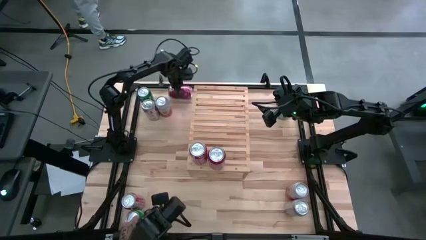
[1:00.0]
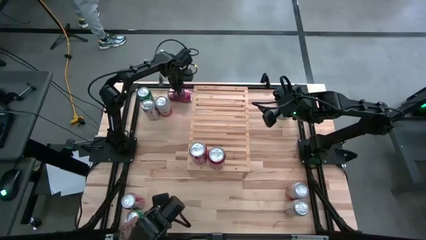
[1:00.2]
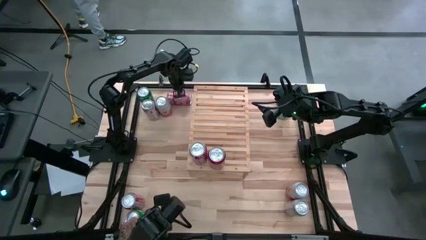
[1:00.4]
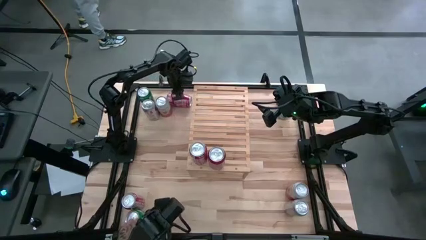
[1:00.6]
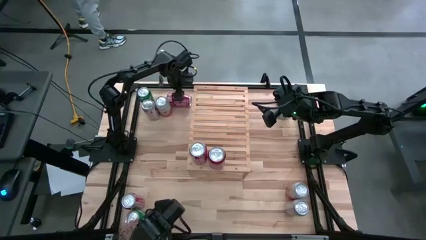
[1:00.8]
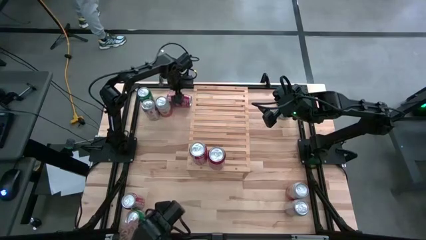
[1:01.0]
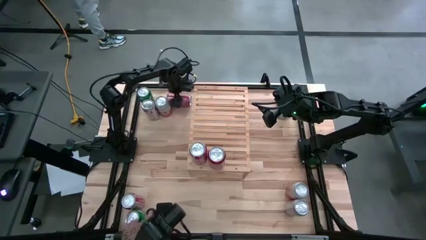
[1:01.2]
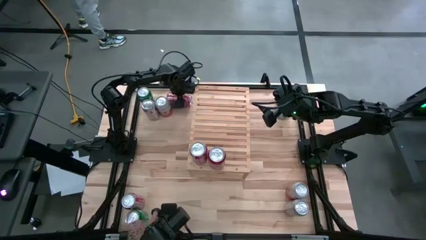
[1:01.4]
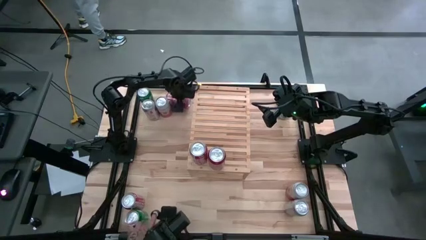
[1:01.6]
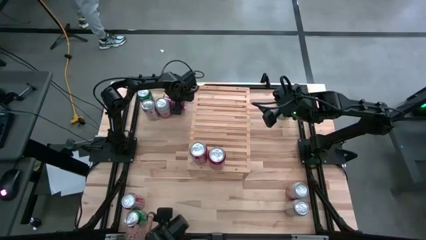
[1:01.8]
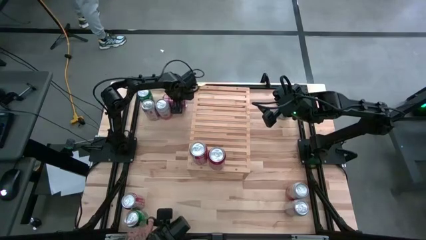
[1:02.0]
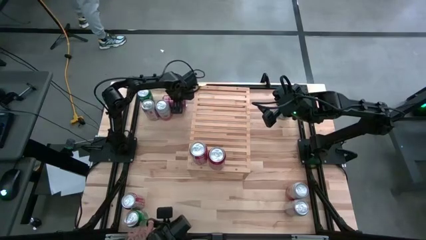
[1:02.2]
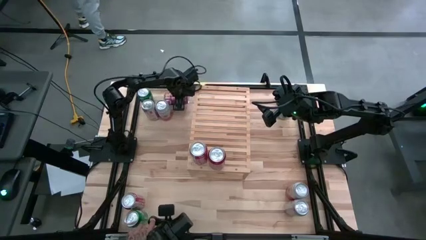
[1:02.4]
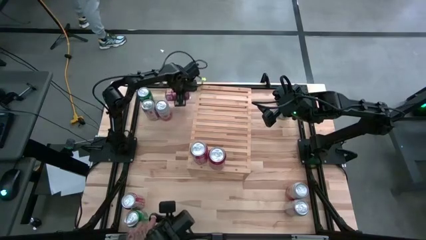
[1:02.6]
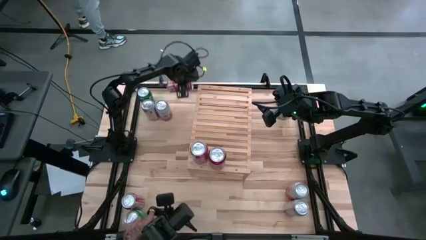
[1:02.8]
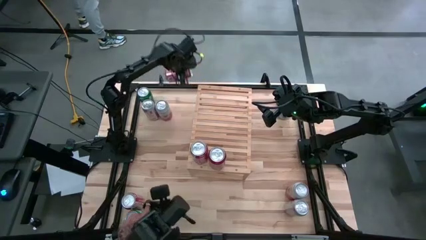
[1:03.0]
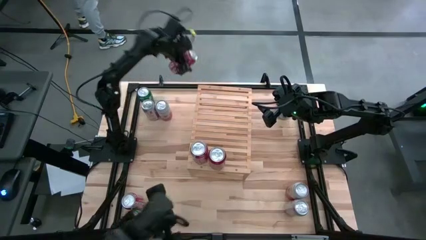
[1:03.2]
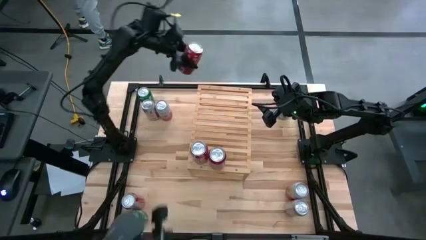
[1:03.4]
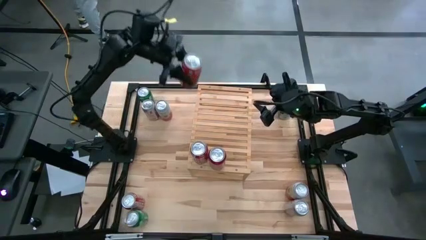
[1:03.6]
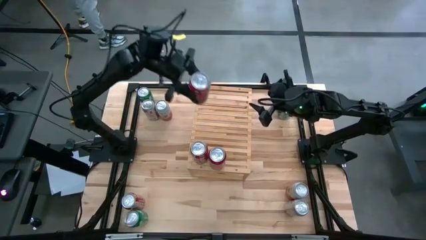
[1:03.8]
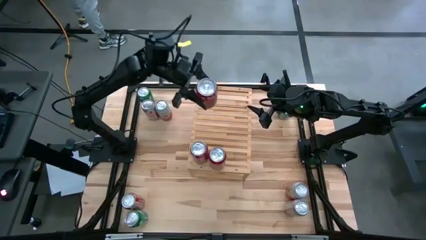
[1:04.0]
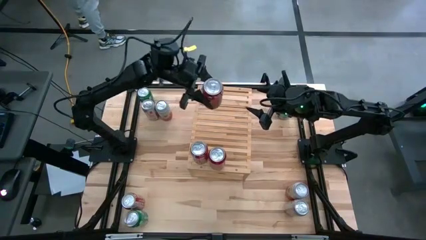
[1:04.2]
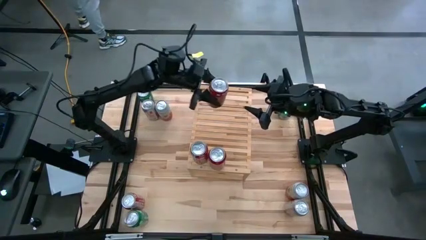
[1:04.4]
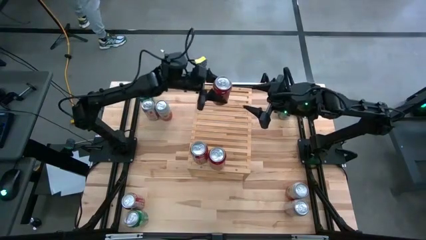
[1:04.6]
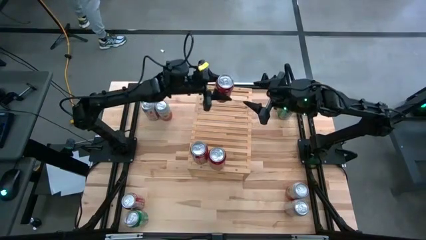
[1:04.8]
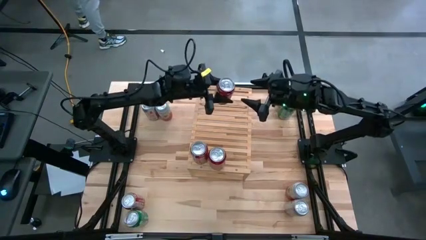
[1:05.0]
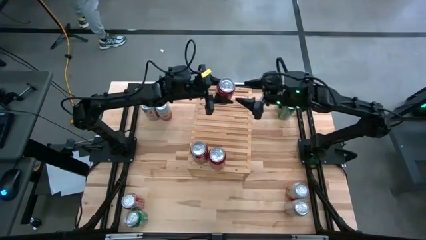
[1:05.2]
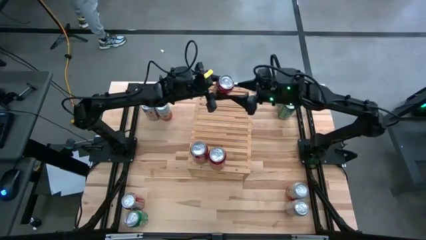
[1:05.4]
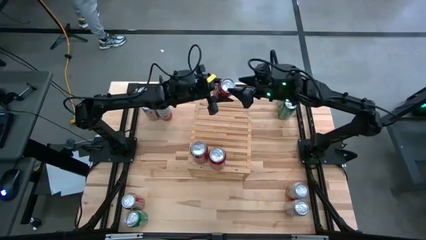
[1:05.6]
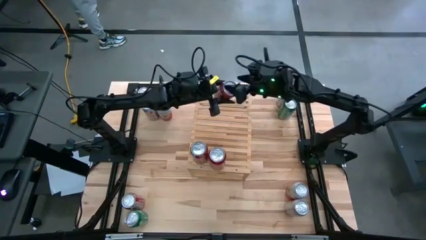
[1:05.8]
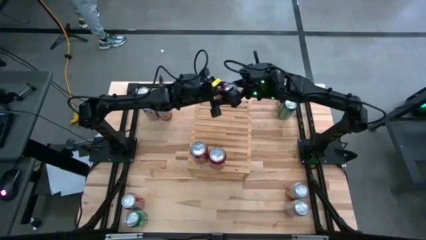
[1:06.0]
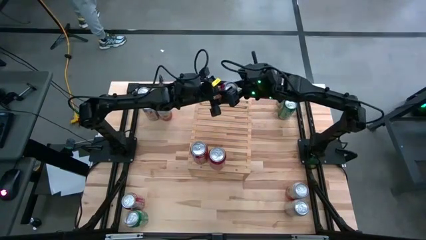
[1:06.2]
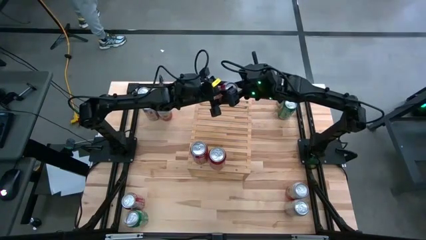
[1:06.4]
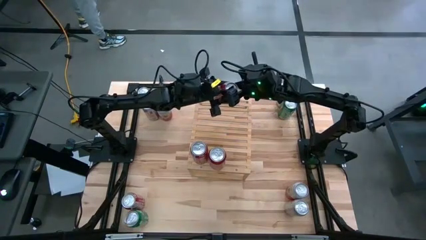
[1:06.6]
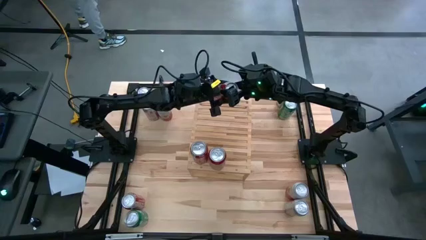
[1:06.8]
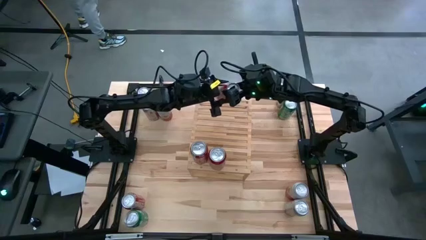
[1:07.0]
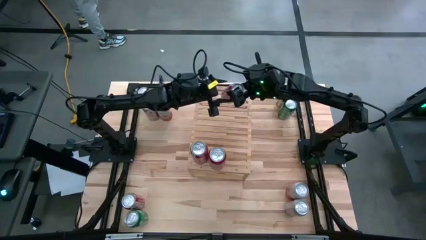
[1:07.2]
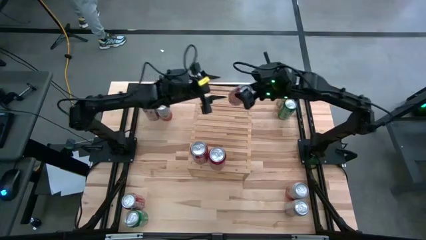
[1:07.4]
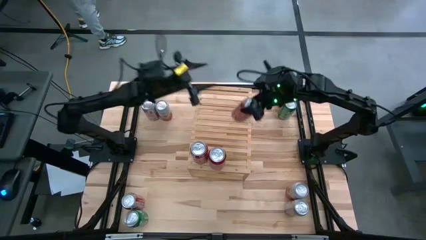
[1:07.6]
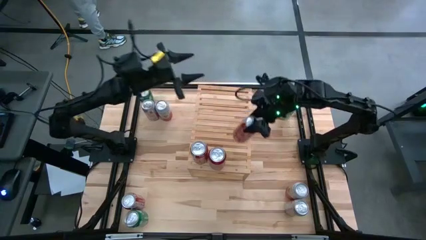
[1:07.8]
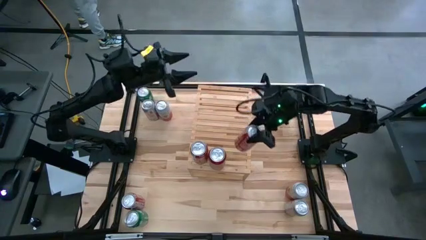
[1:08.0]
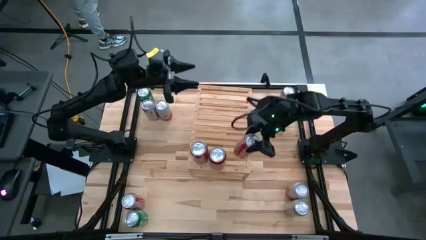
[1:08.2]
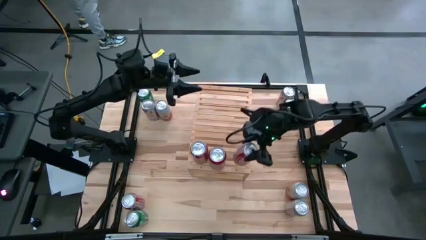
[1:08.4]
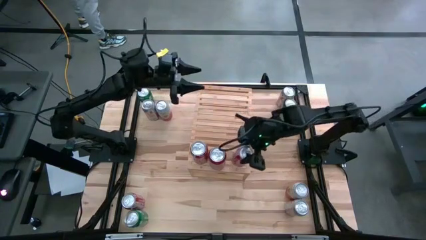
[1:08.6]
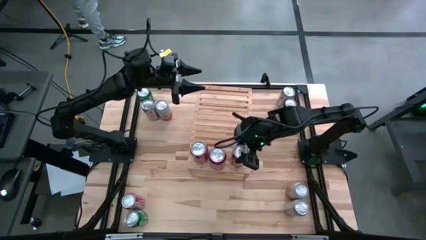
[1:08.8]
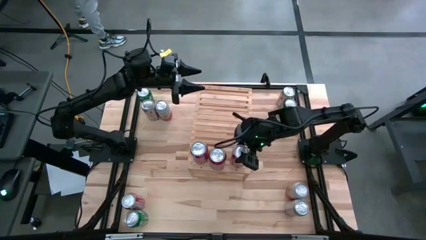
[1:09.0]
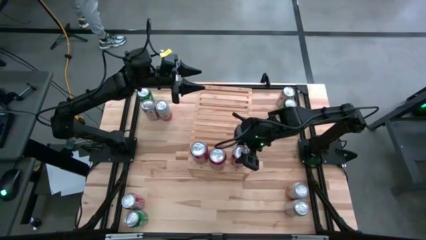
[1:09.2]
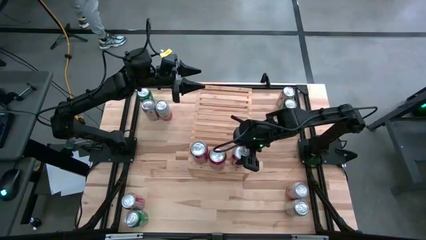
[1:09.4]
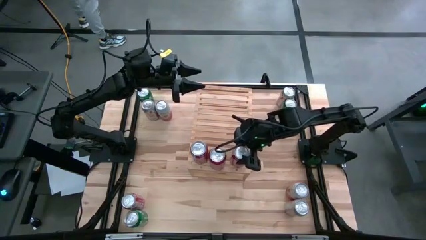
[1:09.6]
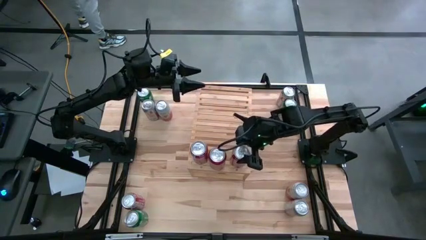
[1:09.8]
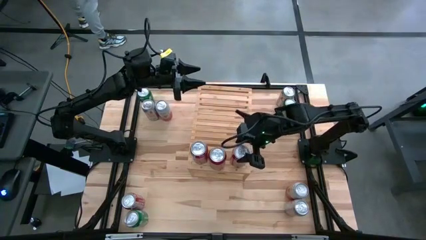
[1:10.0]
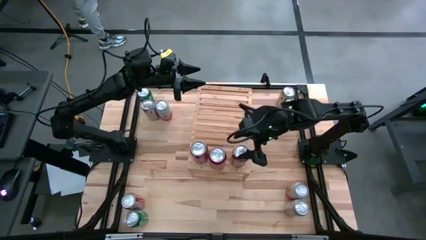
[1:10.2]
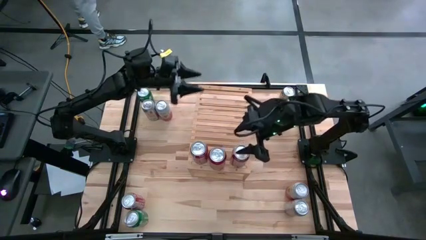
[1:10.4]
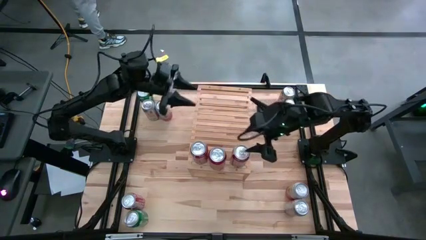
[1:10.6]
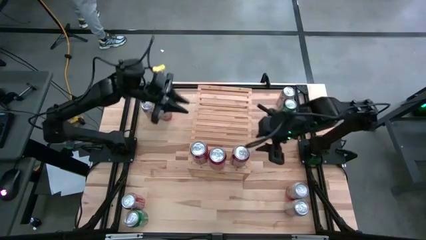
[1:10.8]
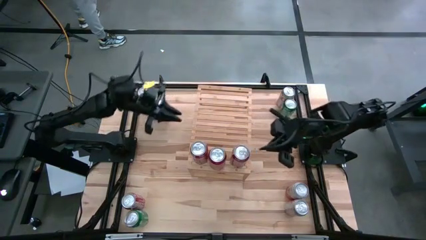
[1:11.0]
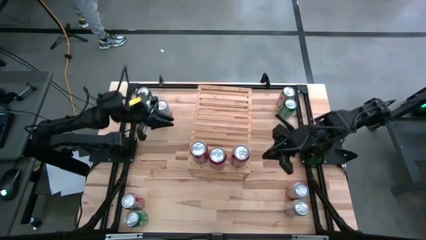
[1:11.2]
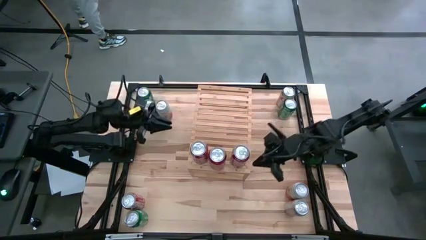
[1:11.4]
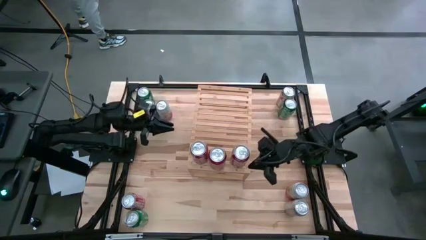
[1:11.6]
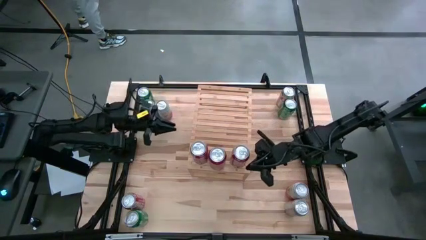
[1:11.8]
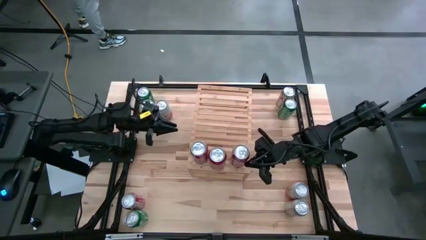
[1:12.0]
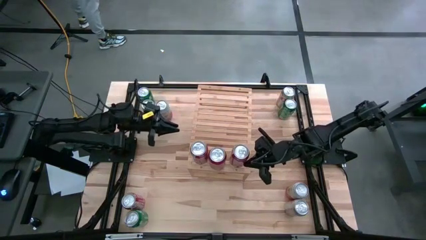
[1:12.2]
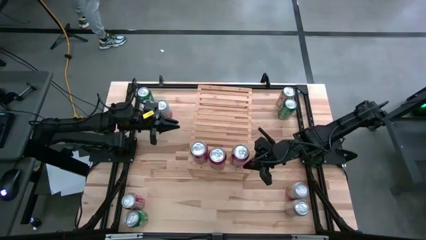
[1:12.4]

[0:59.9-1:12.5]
Task: Place canned beverage on shelf
Put the top red soda can on the shelf aligned with the other red soda cans

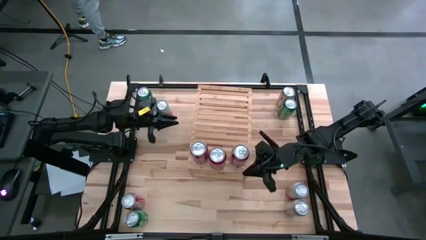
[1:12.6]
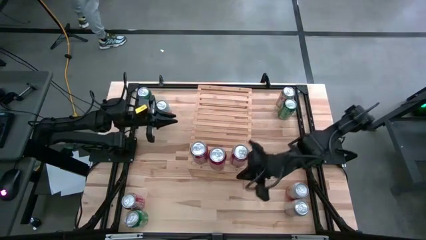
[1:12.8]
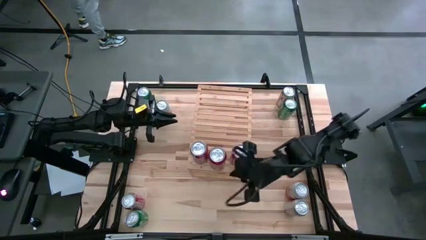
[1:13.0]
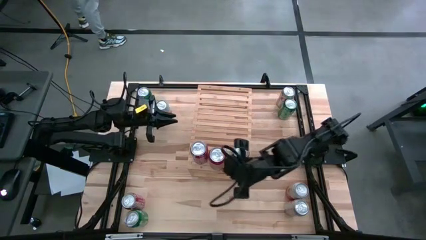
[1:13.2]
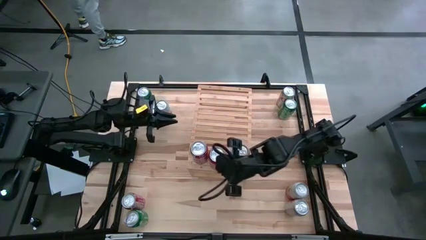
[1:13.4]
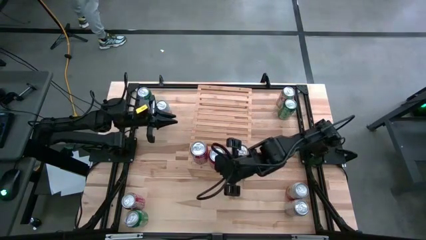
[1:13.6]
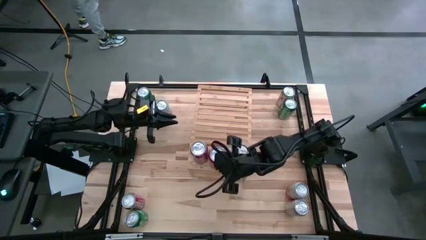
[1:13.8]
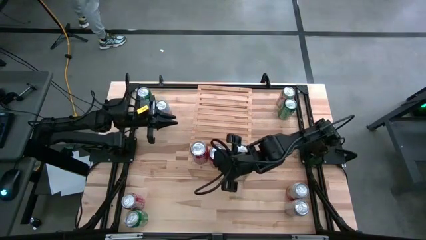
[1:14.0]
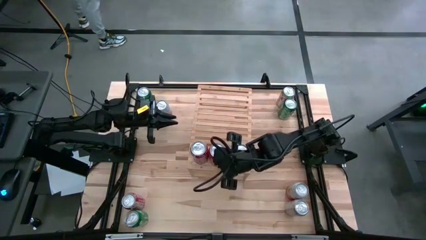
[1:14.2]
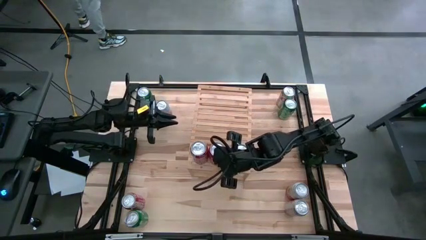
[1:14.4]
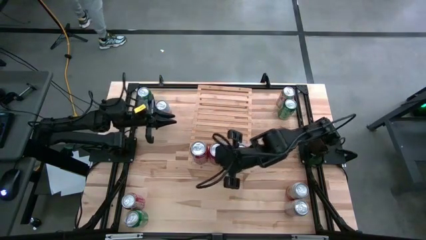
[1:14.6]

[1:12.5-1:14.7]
Adjust the middle red soda can on the shelf
